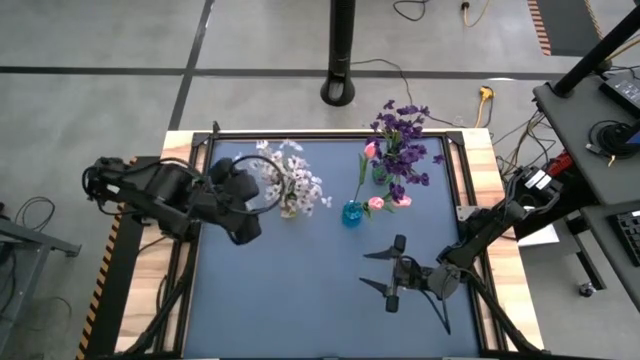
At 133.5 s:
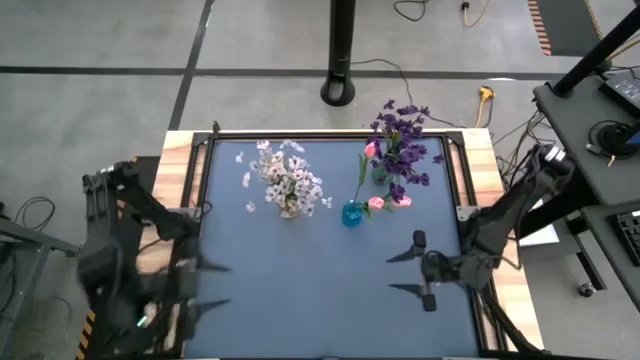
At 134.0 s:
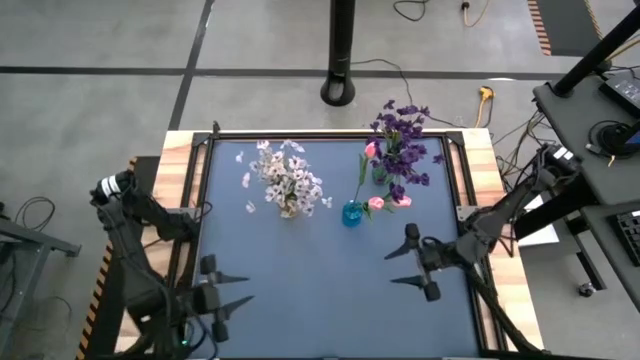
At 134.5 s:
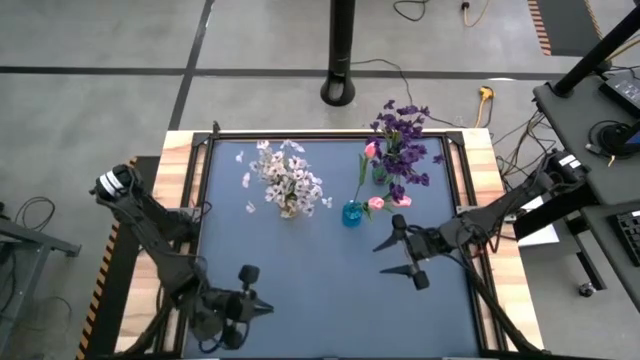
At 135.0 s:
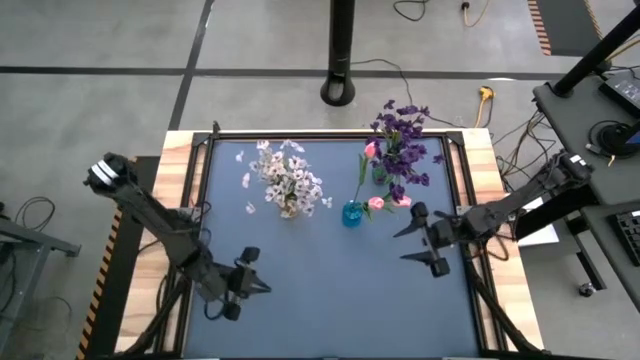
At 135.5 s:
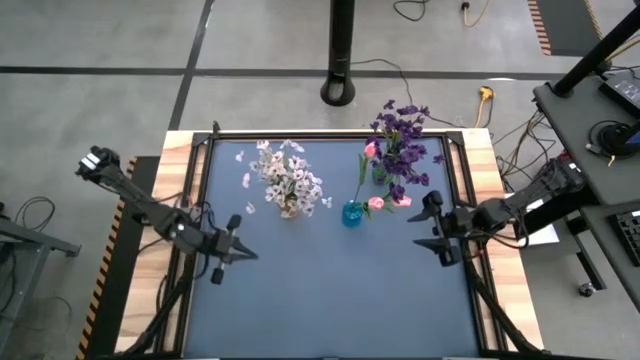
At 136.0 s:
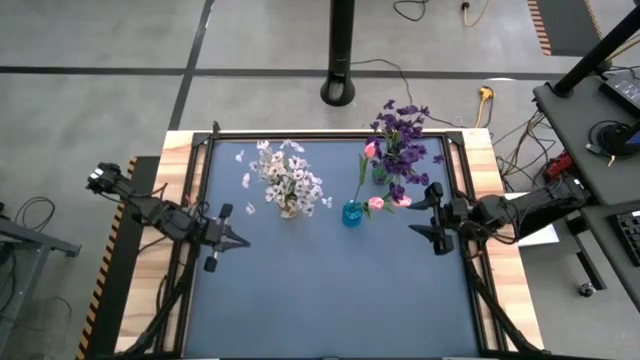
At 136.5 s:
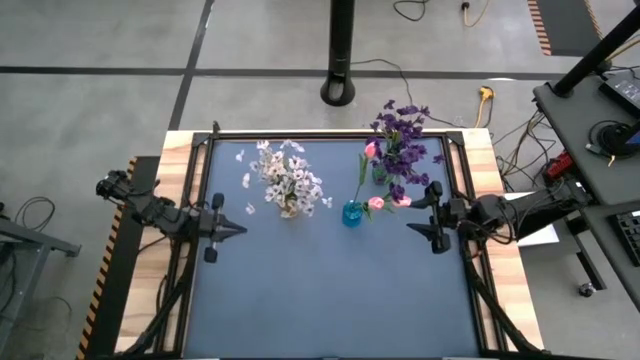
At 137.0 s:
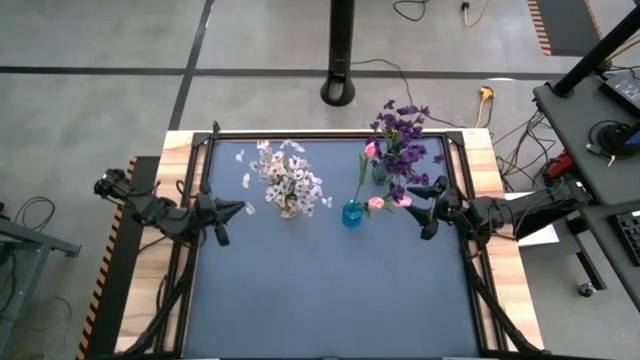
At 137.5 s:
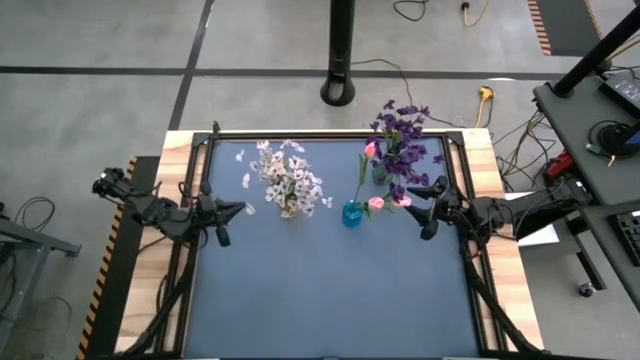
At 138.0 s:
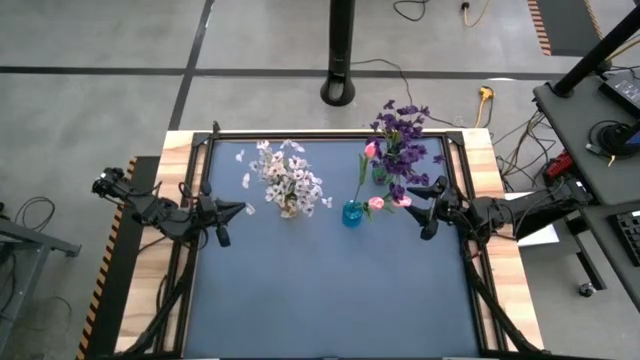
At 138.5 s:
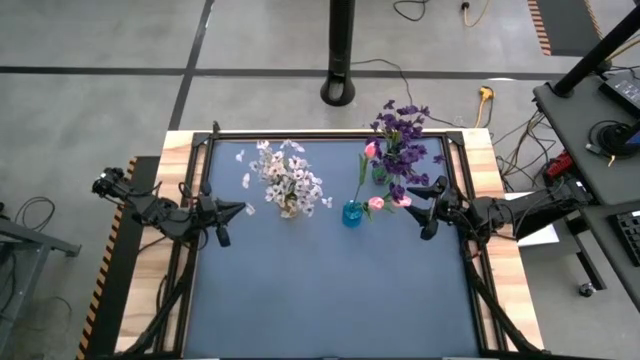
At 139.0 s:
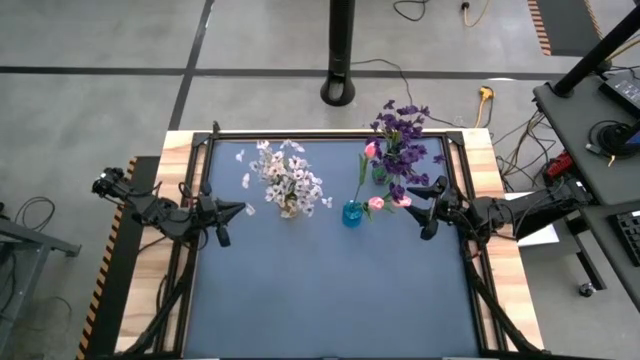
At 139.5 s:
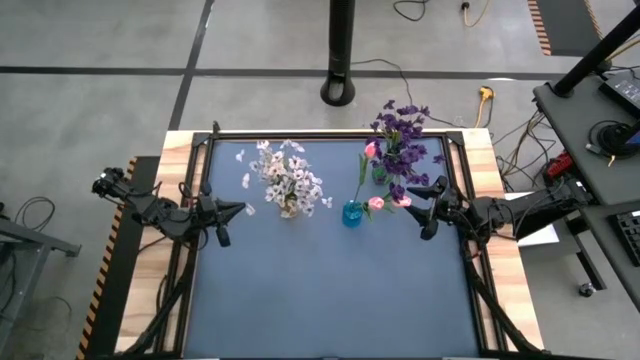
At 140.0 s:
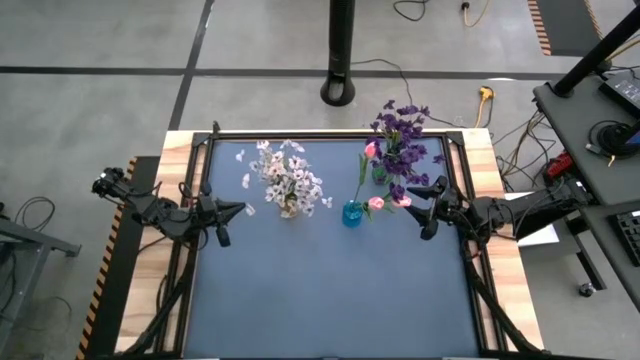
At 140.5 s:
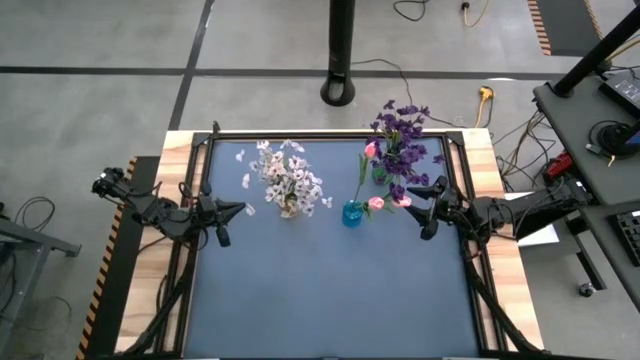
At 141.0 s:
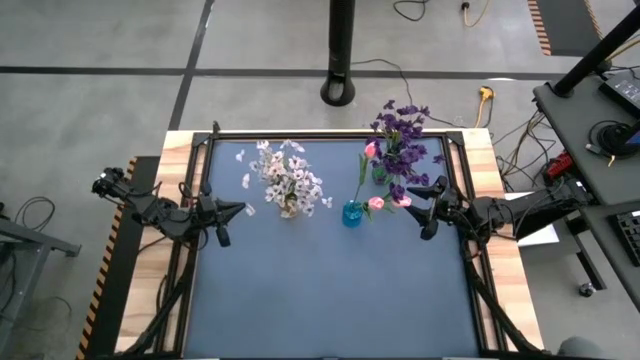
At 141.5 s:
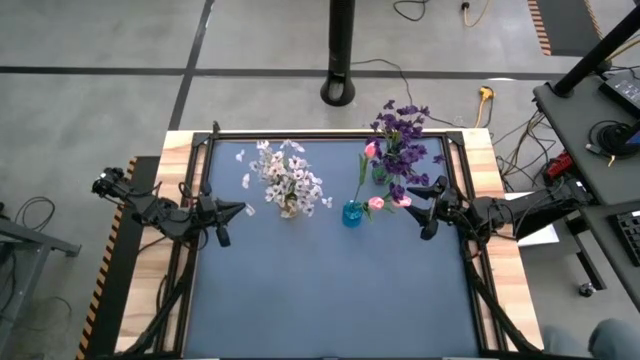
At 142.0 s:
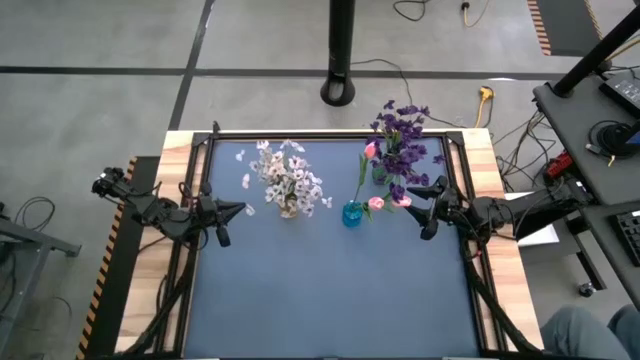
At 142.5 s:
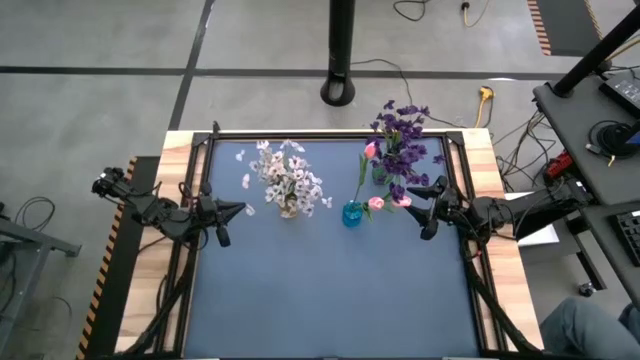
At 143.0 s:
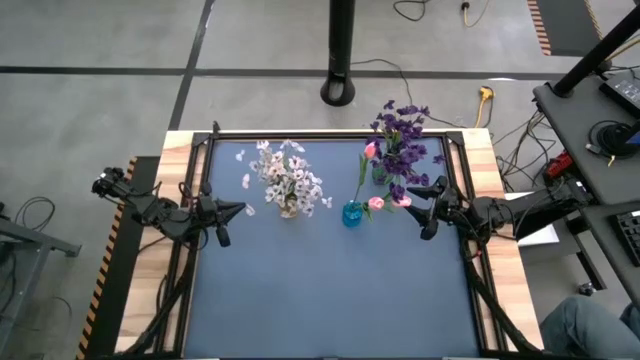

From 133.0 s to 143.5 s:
Task: Sort flowers into vase by color
Return to Home Position

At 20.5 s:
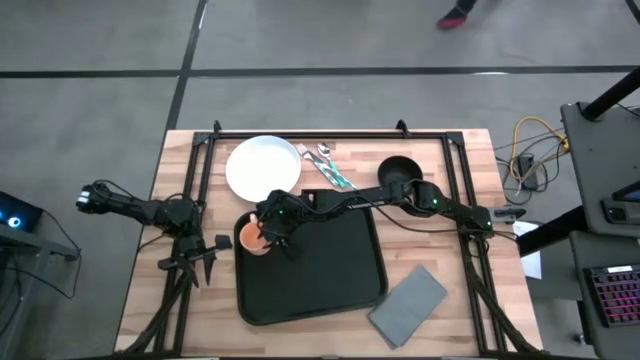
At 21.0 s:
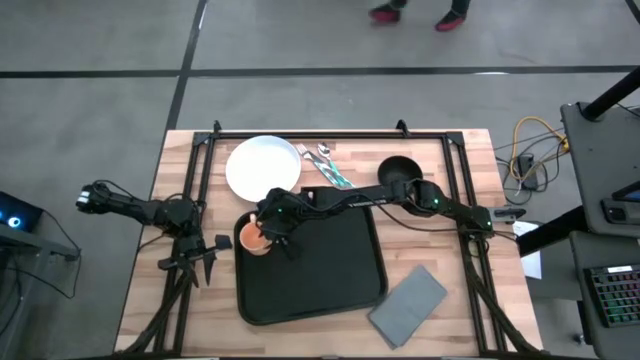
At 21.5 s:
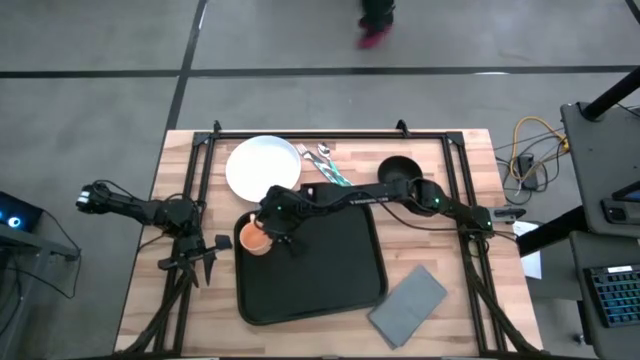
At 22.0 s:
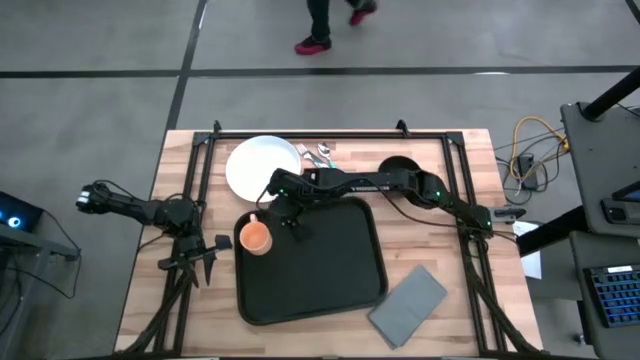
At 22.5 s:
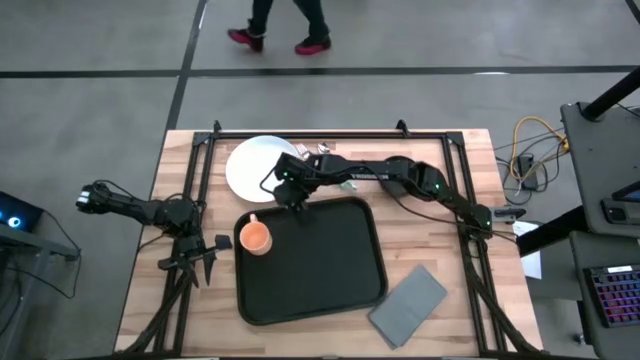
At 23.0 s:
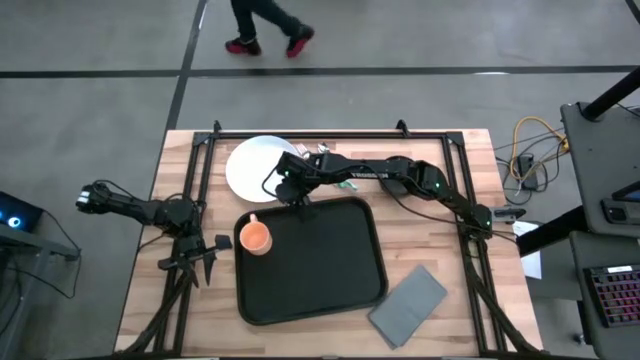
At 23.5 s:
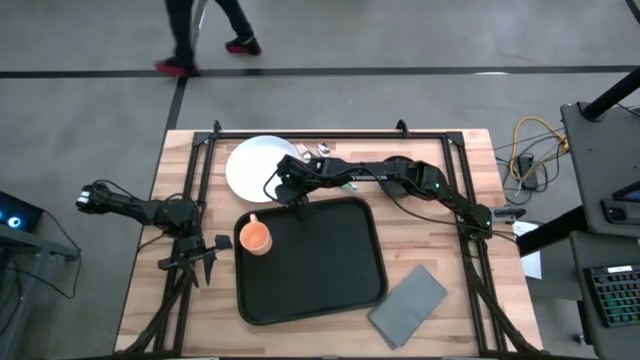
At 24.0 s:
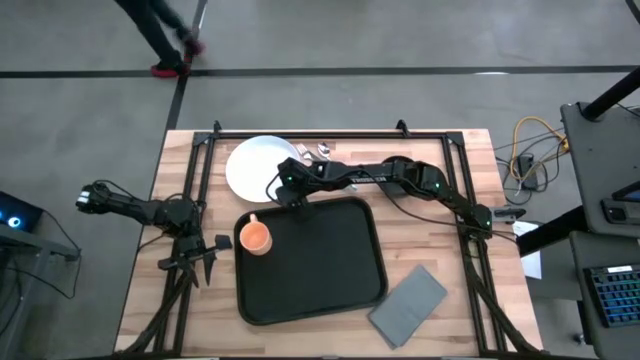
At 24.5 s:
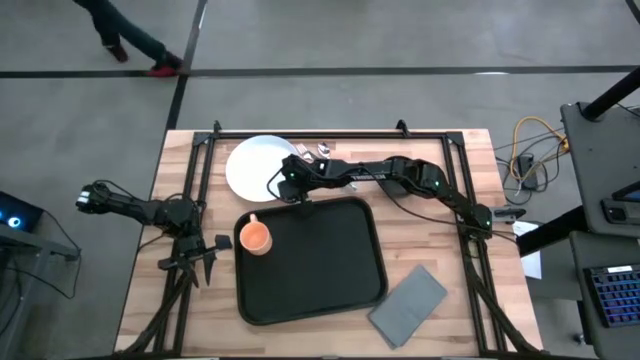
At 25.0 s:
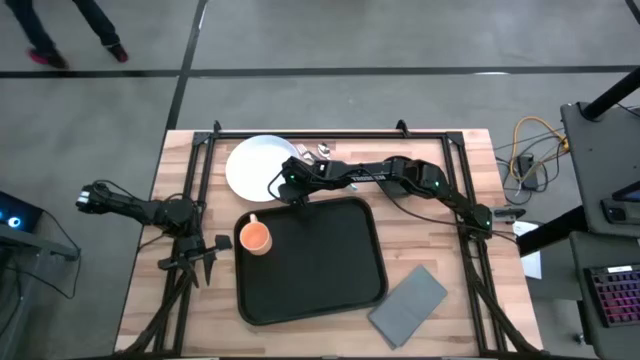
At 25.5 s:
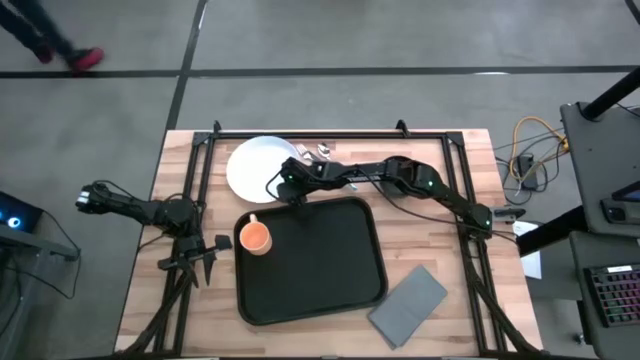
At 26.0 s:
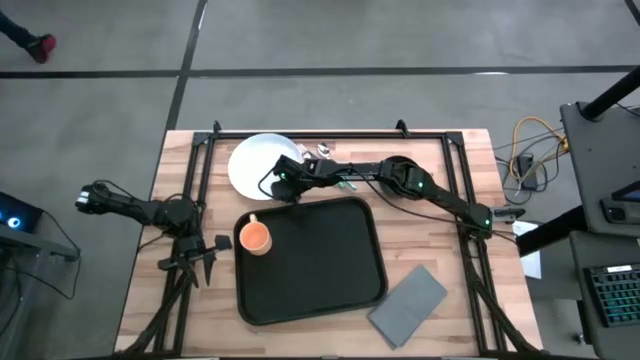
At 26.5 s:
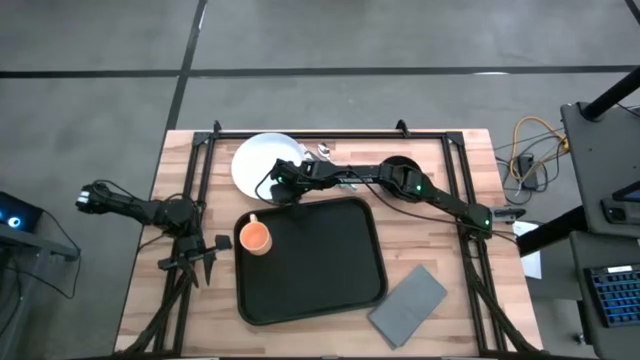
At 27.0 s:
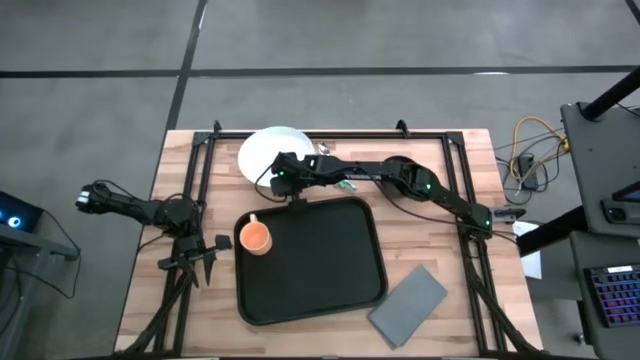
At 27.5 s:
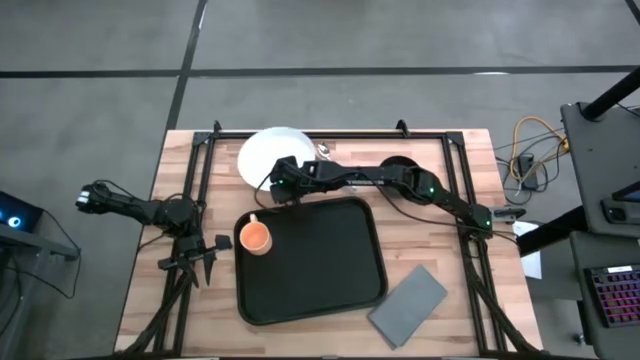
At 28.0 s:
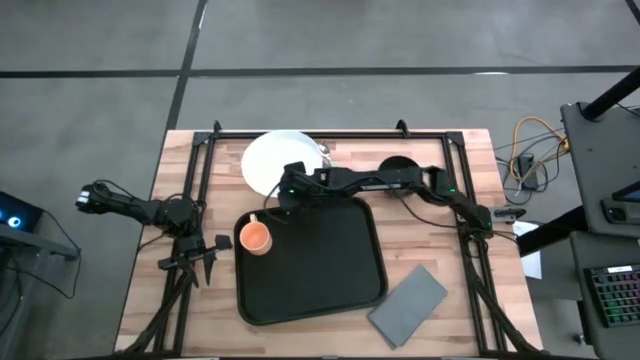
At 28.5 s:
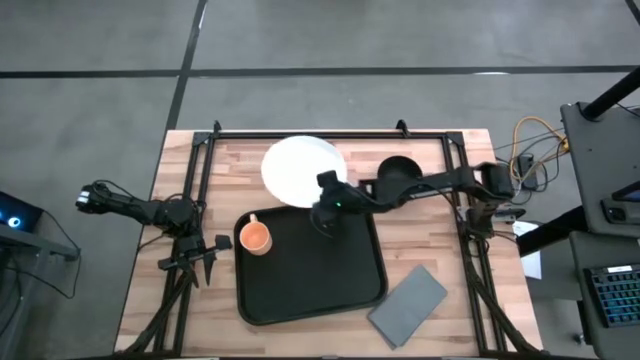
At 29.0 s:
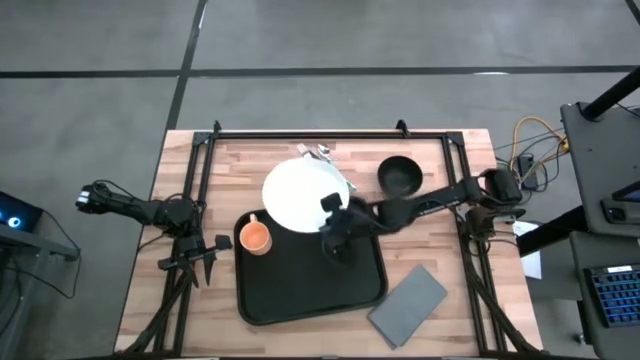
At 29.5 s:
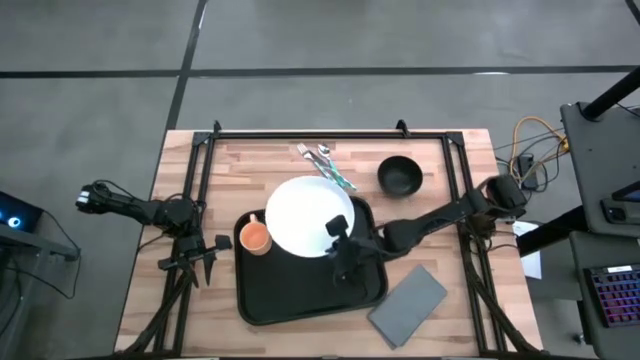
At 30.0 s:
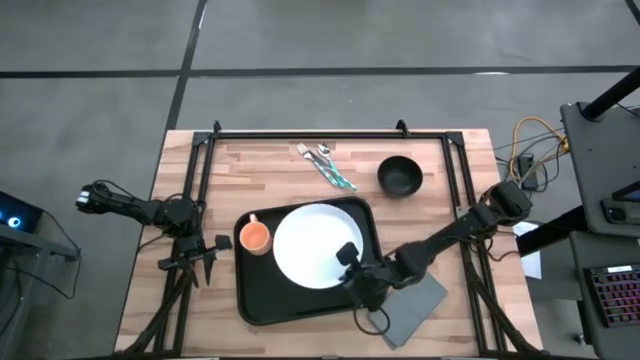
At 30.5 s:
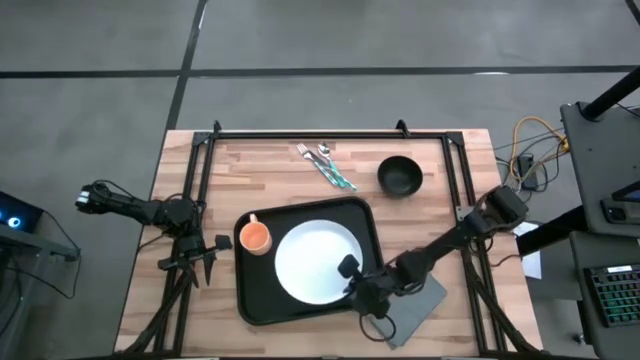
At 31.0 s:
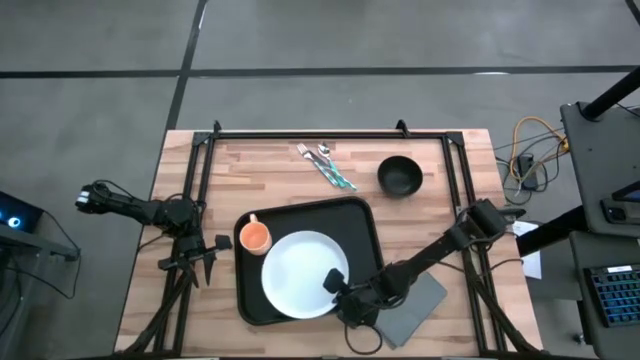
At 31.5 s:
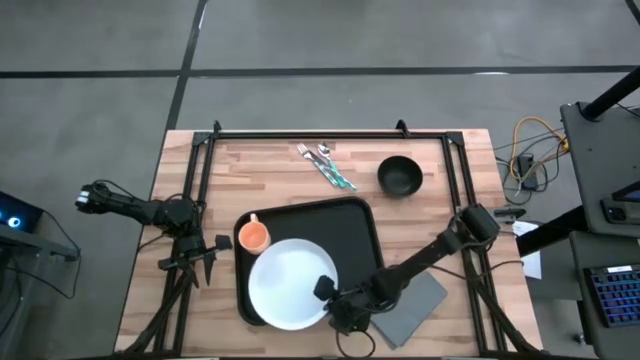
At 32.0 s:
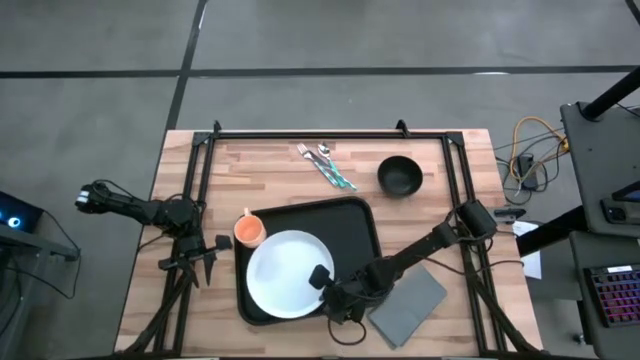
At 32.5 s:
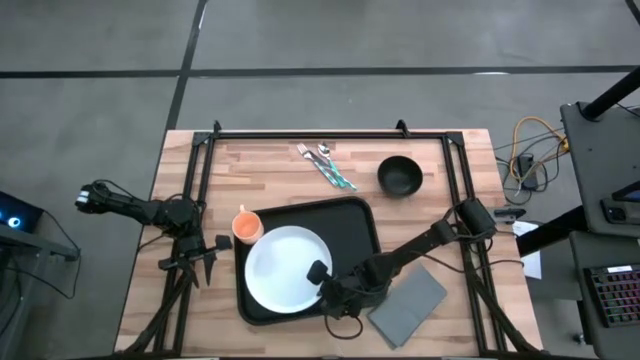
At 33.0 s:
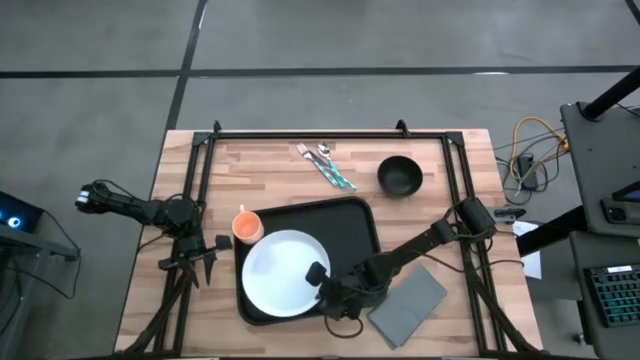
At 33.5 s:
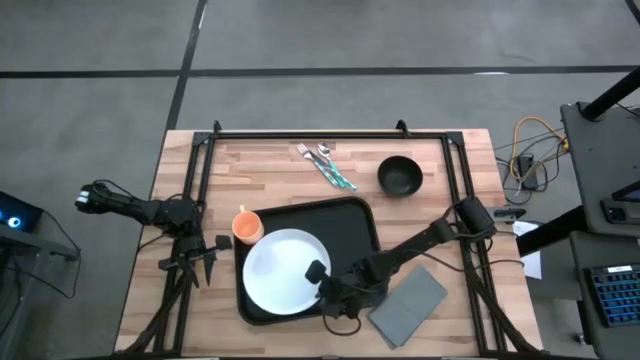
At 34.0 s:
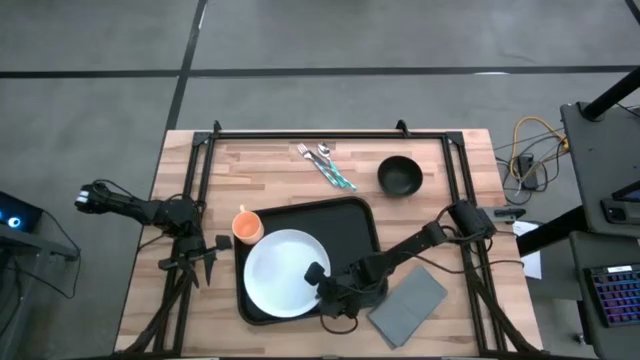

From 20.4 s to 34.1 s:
Task: Set up tray
Put the white plate on the serving tray
